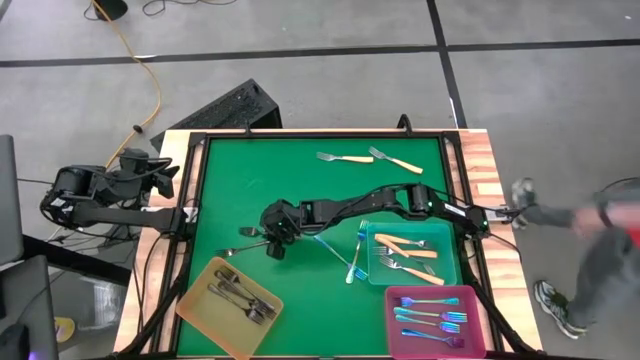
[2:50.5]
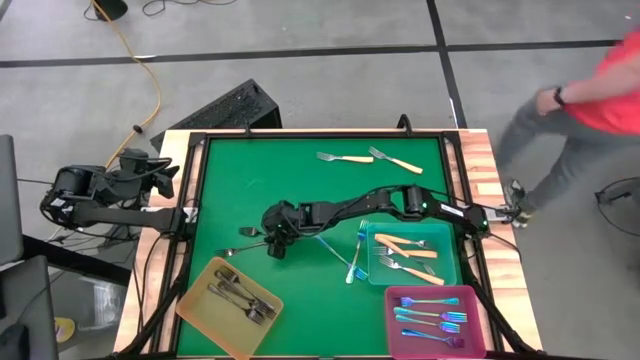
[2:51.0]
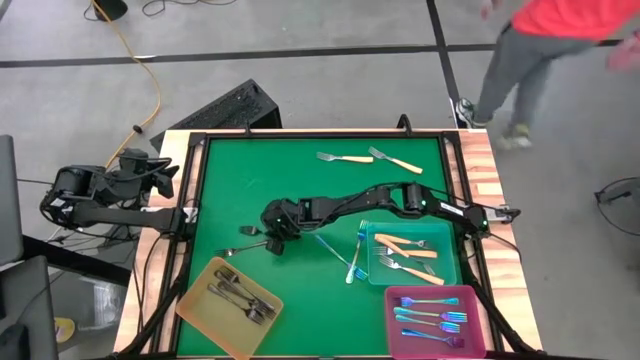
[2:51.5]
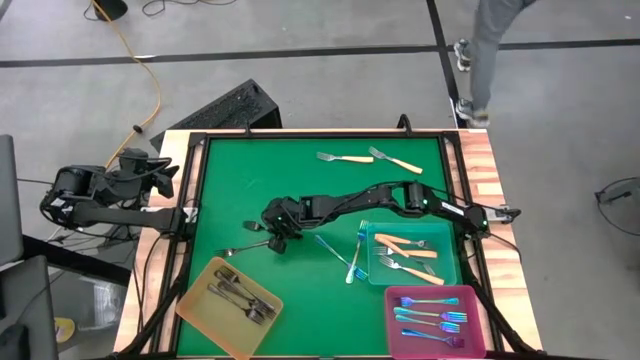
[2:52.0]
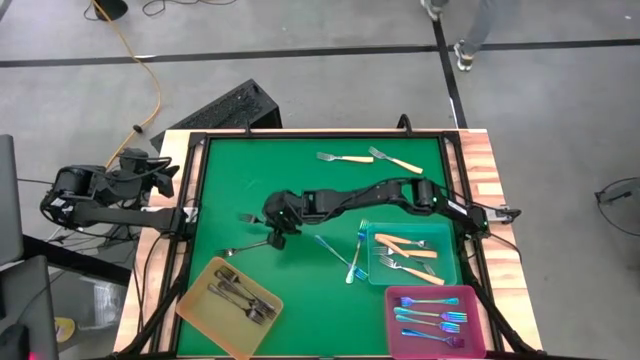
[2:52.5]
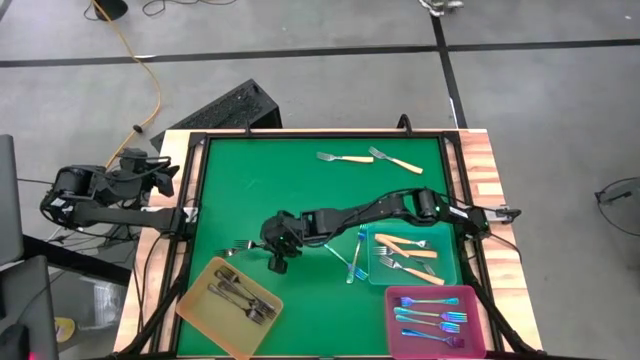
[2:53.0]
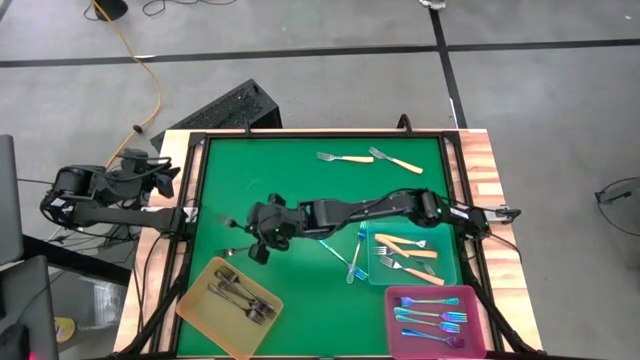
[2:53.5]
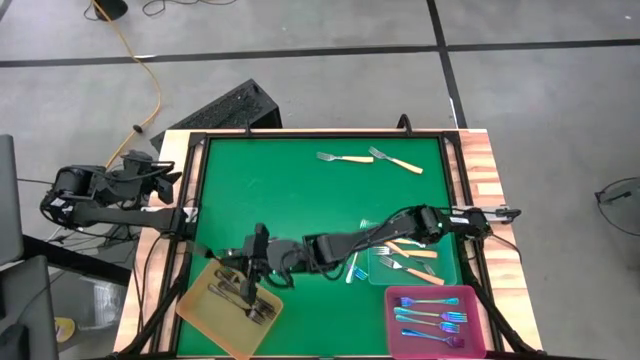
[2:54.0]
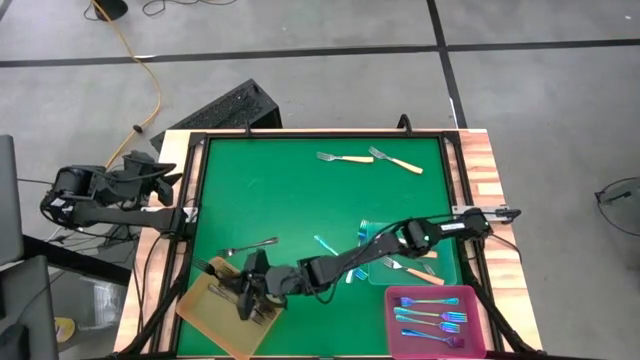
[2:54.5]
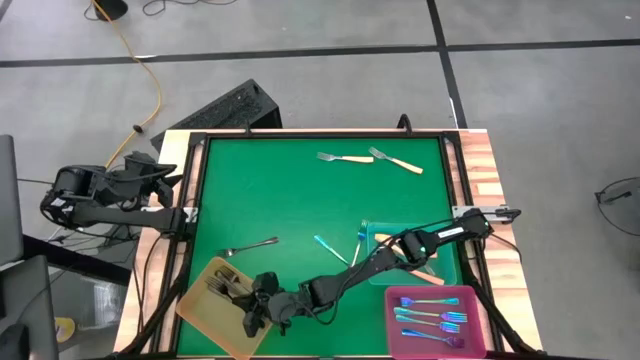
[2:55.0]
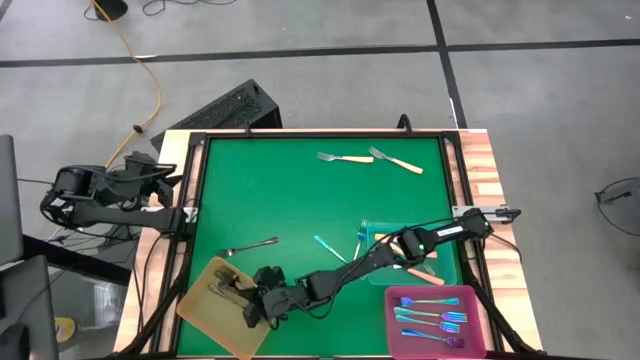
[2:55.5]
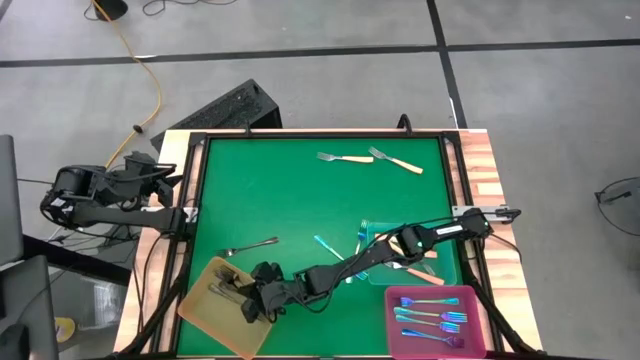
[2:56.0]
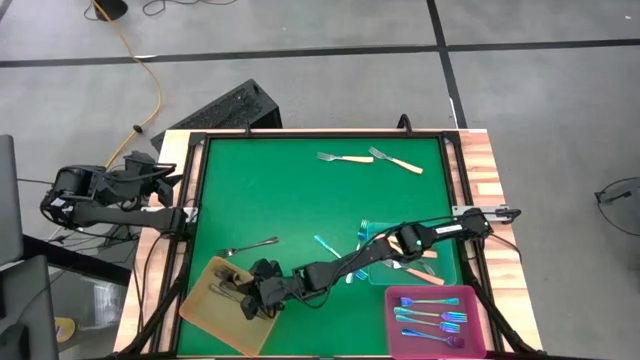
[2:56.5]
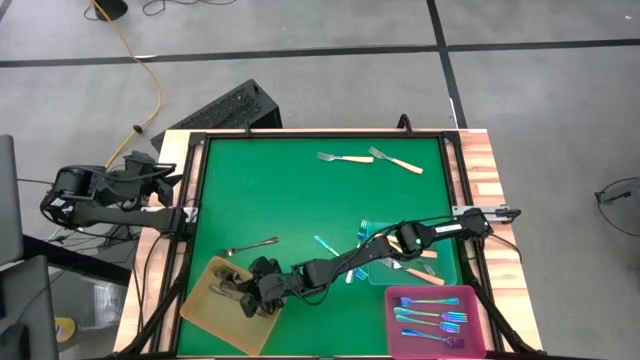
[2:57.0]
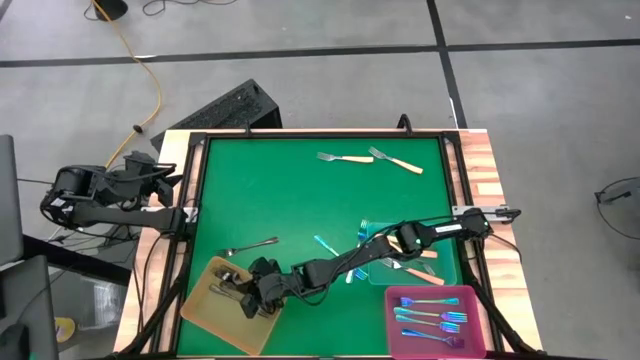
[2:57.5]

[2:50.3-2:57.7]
Task: Sort silverware by color (type)
Put the black fork into the orange bin

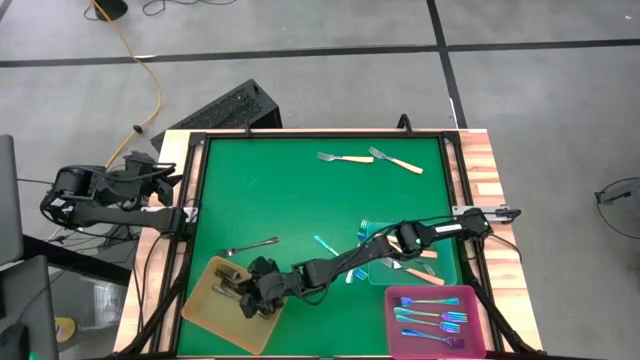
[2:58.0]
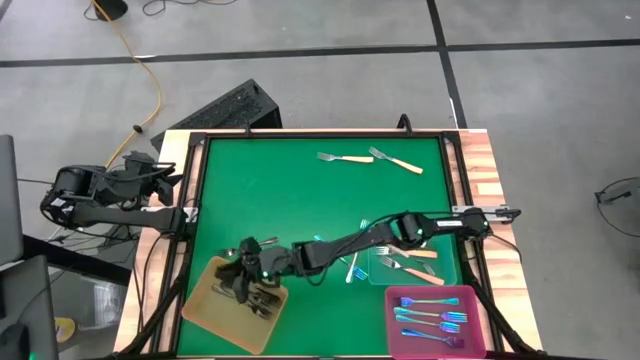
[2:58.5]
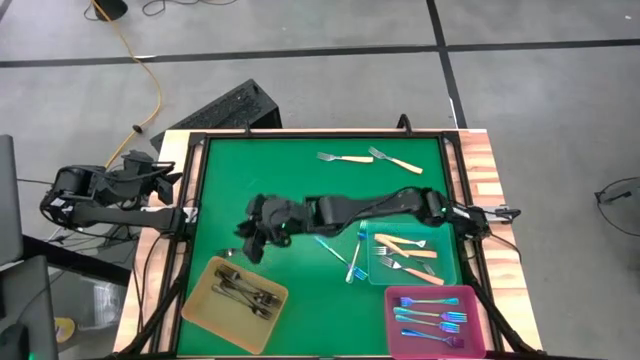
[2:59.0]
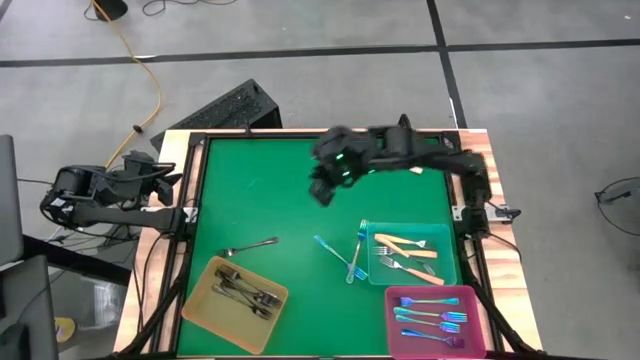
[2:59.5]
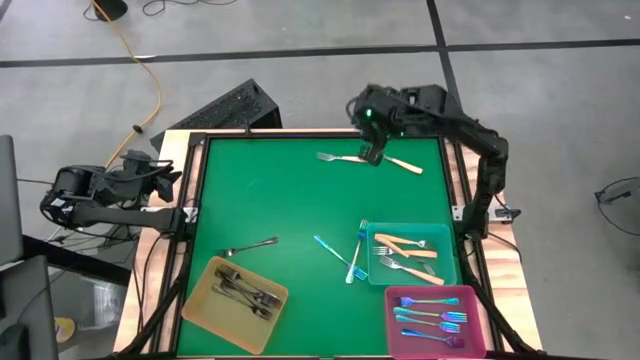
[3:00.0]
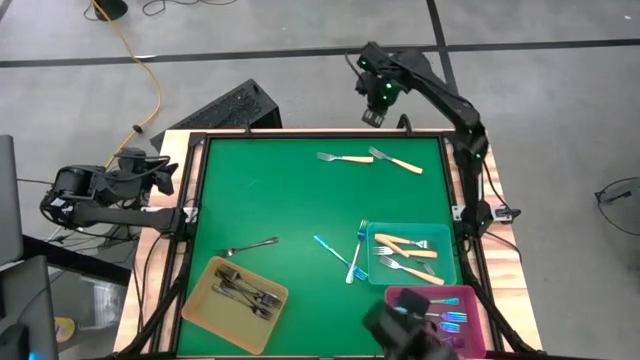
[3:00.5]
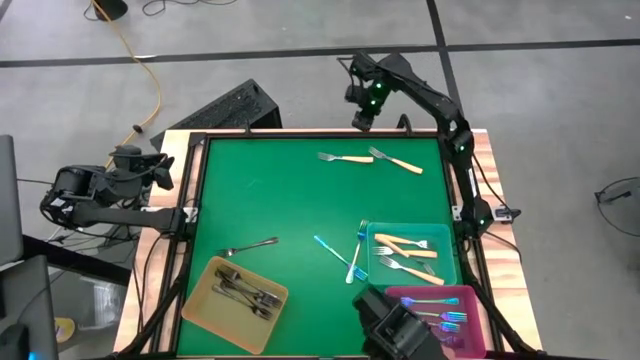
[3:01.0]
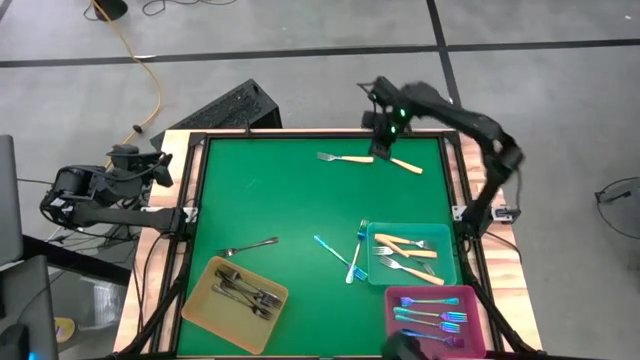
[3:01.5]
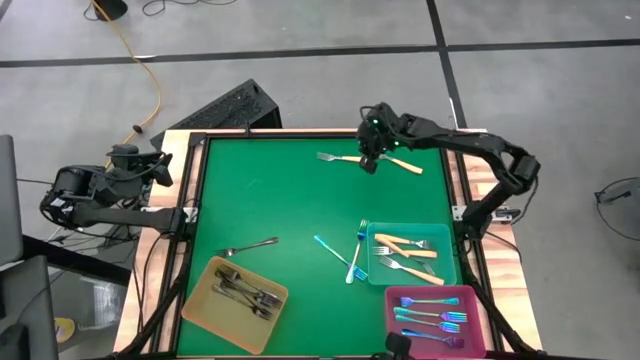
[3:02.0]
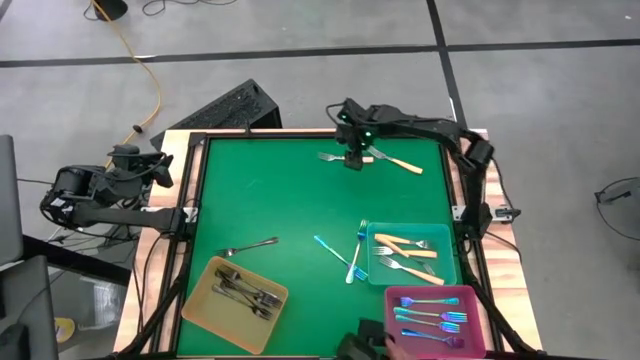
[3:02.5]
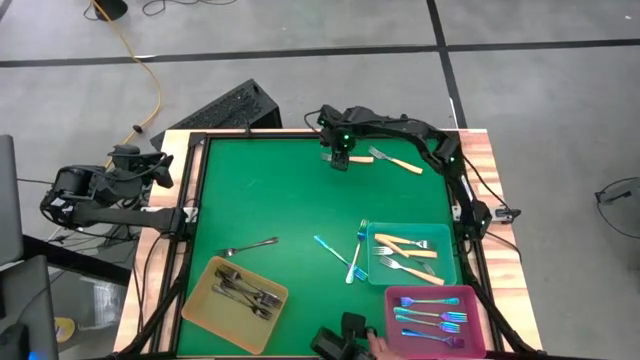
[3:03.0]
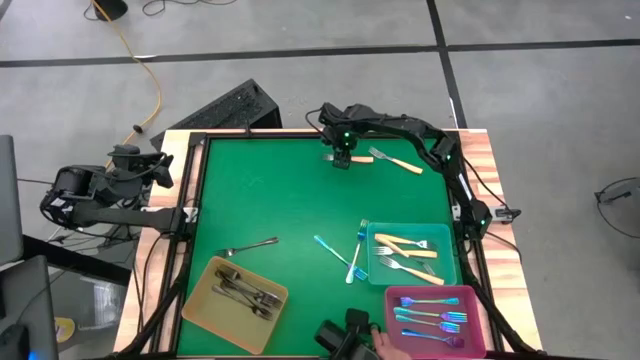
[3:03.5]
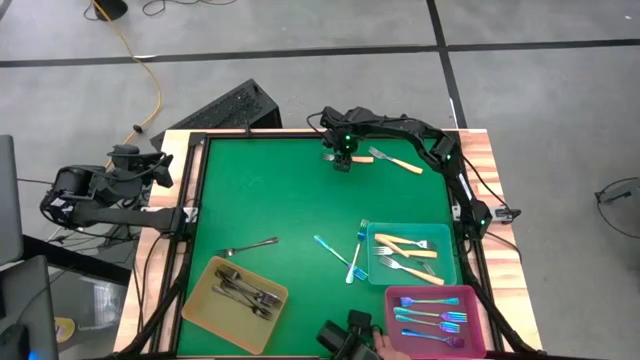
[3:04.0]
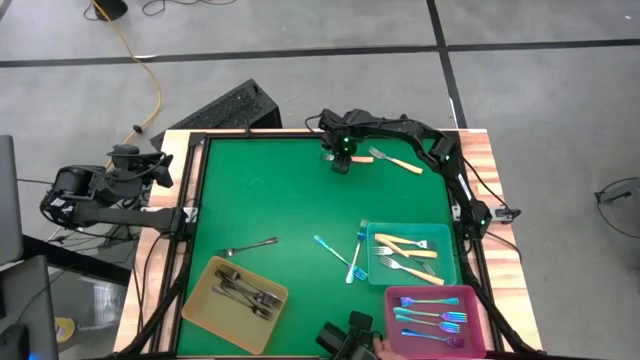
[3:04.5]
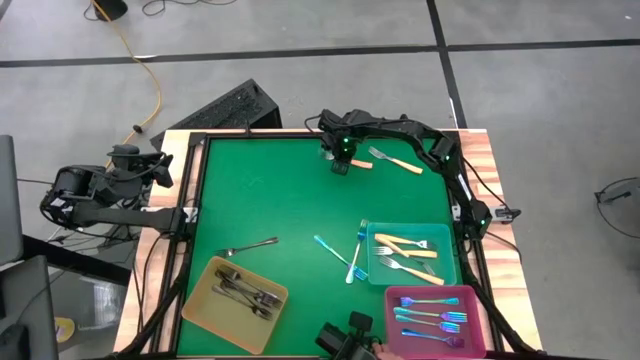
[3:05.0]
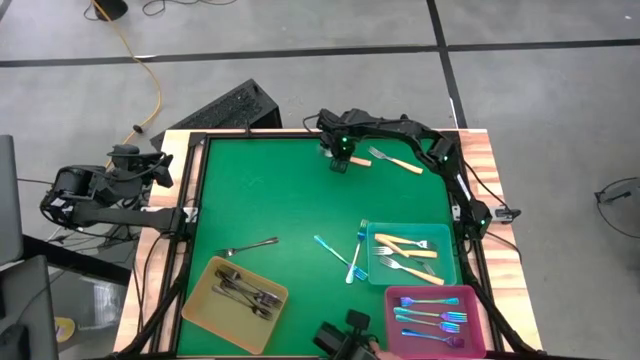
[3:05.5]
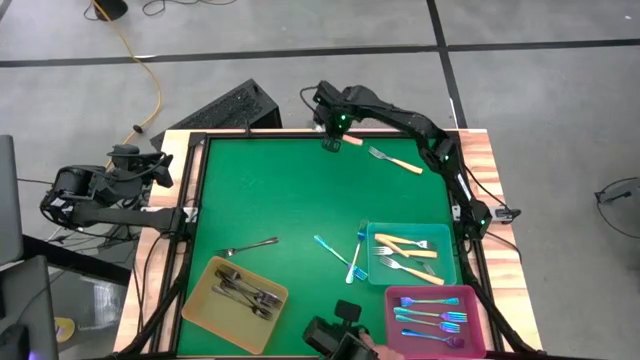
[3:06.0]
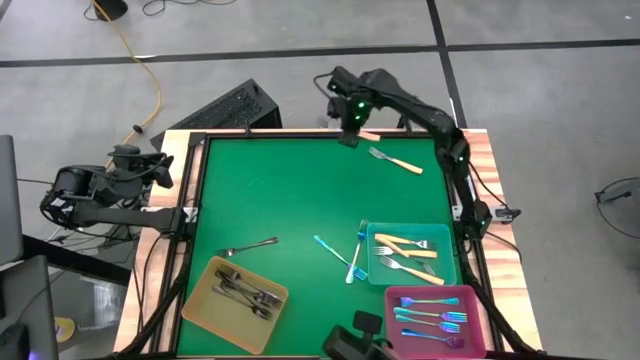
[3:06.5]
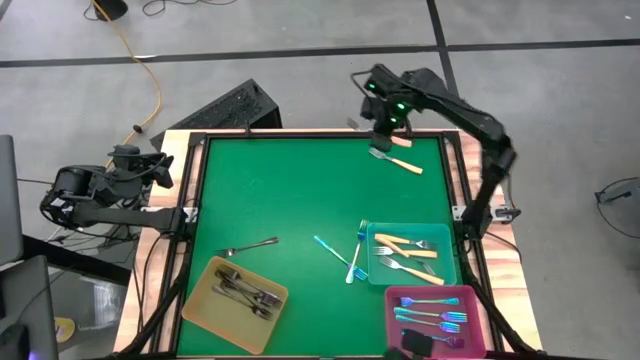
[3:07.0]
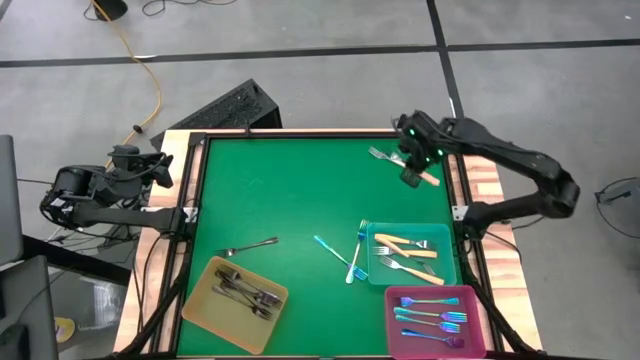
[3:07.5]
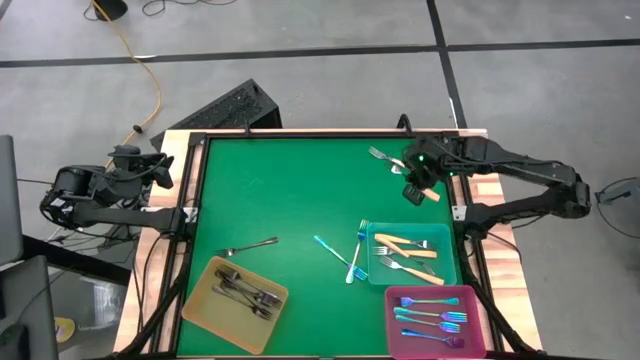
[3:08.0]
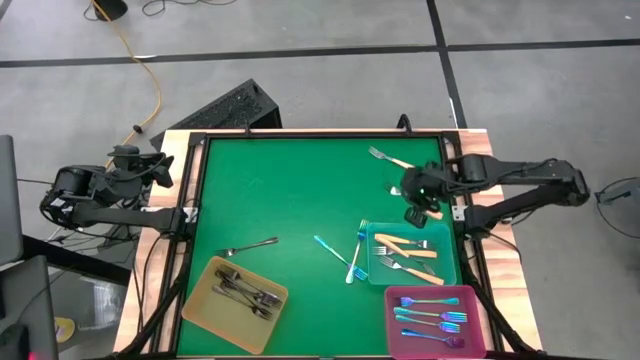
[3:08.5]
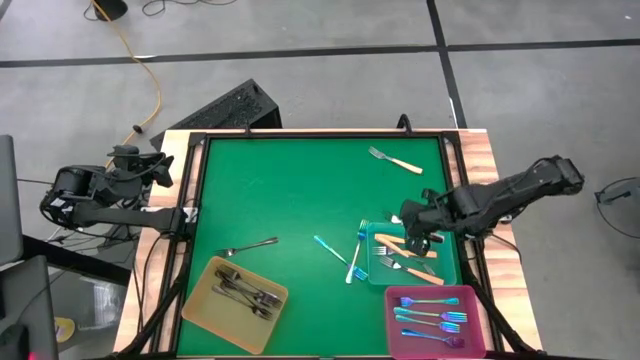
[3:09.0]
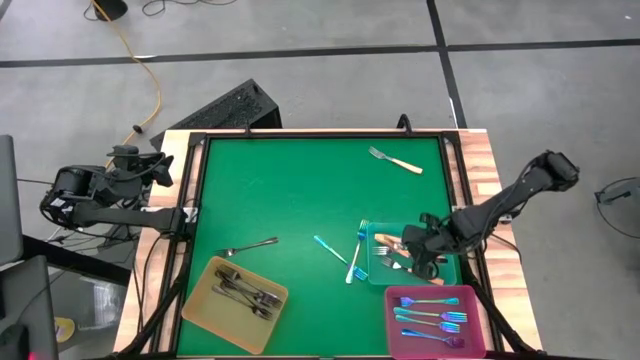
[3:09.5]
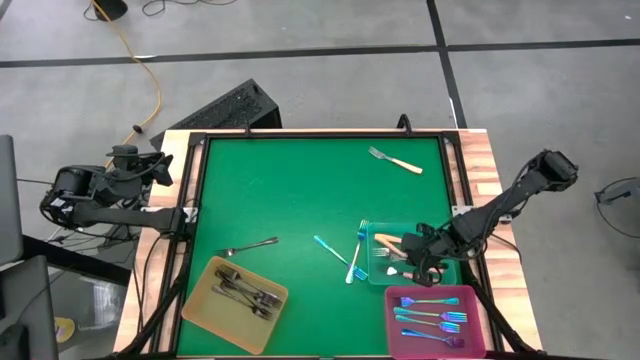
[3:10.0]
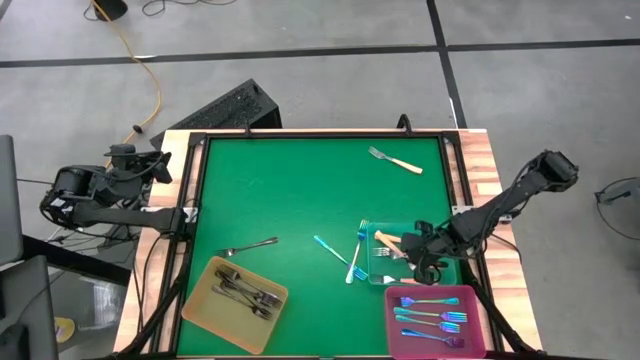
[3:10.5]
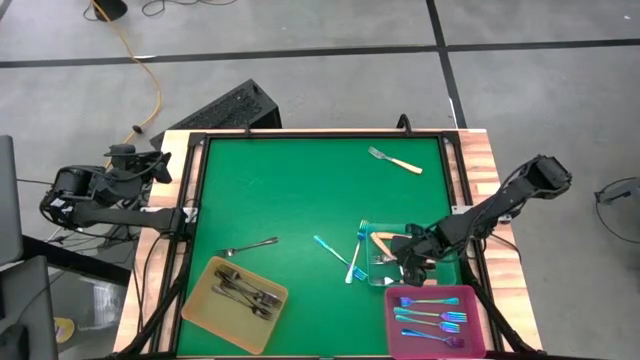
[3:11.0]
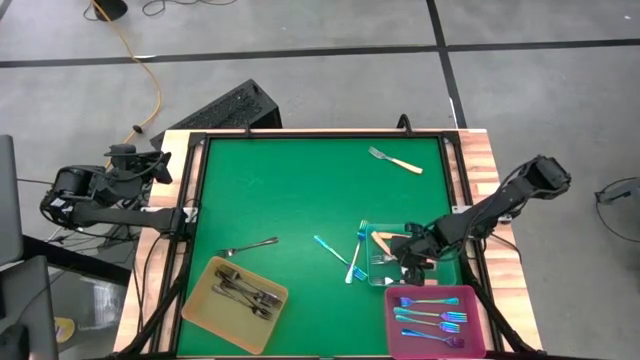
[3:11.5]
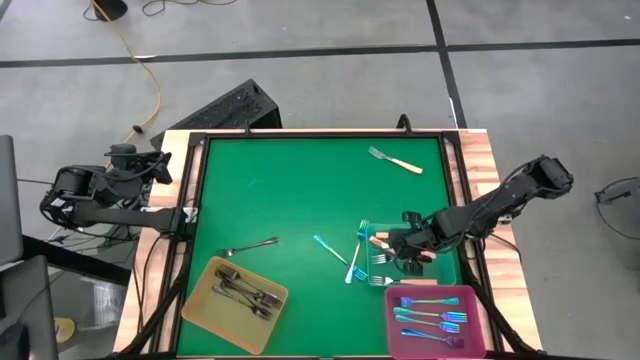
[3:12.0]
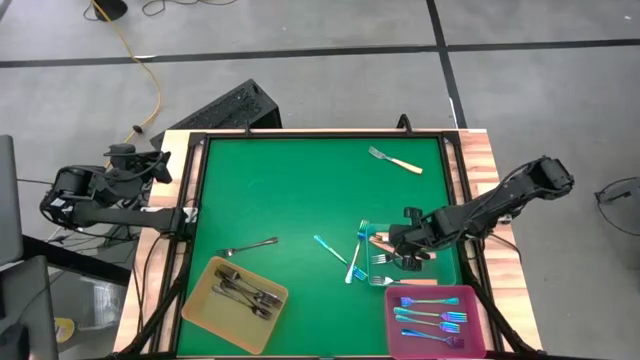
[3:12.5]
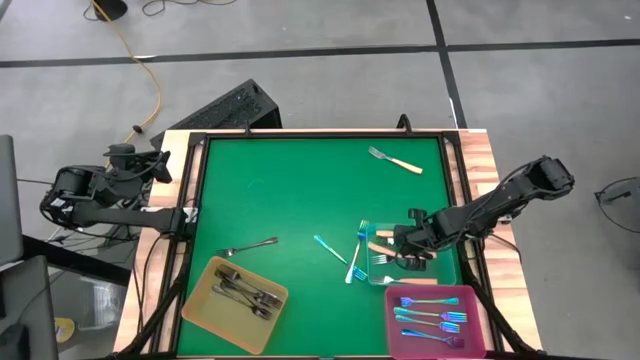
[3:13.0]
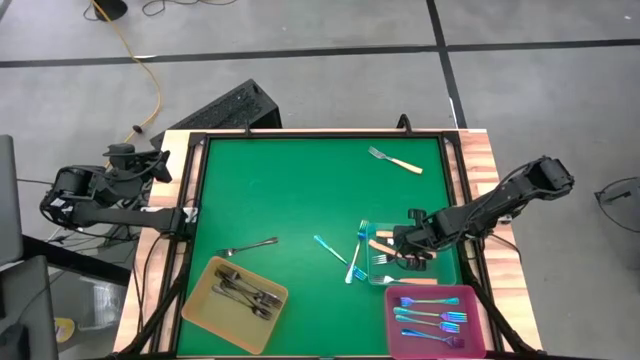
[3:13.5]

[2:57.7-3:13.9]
Put the yellow fork into the green bin
